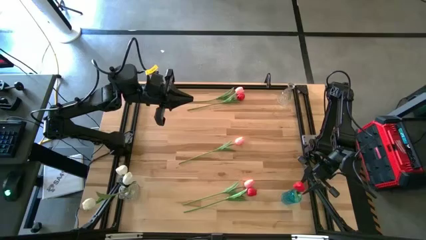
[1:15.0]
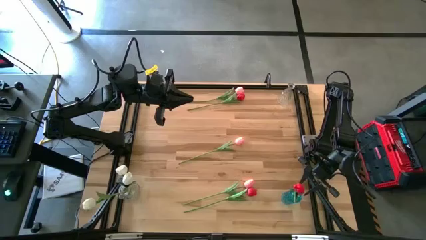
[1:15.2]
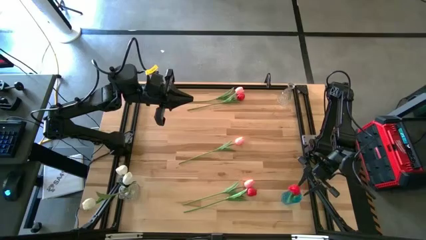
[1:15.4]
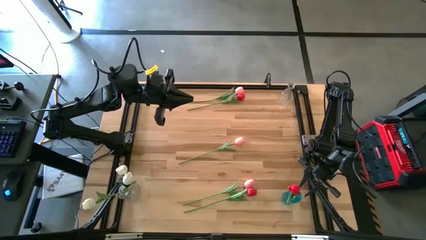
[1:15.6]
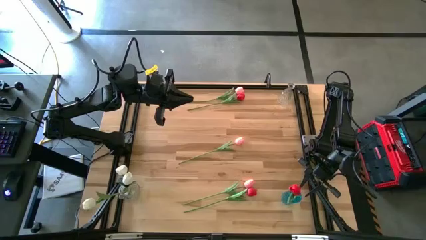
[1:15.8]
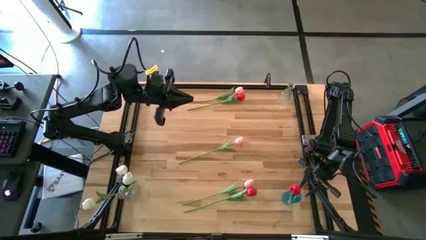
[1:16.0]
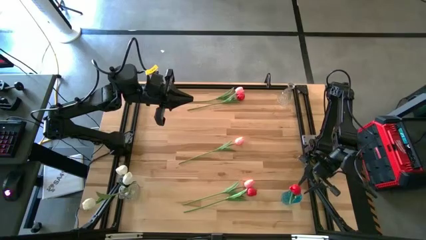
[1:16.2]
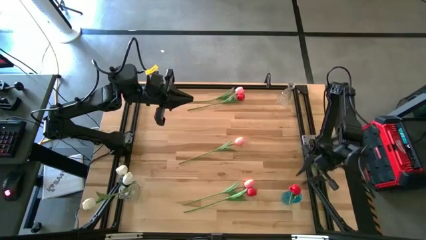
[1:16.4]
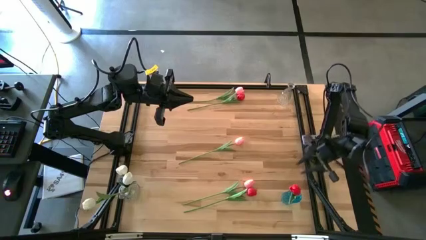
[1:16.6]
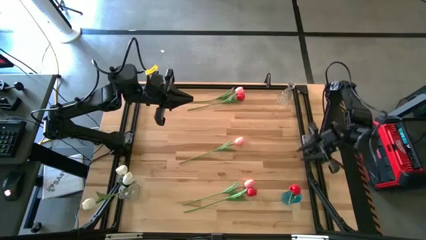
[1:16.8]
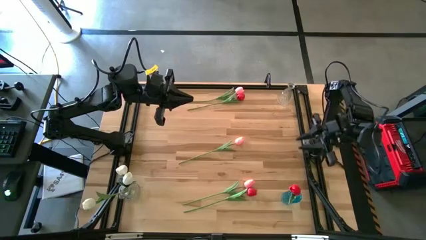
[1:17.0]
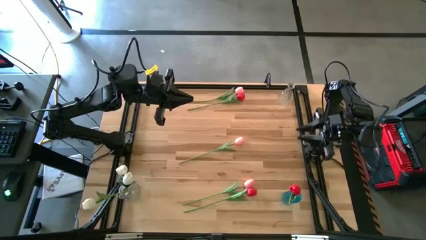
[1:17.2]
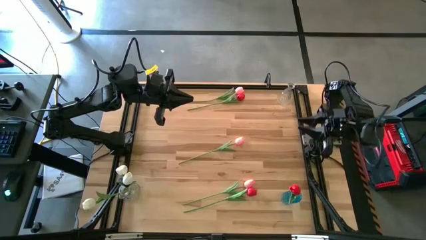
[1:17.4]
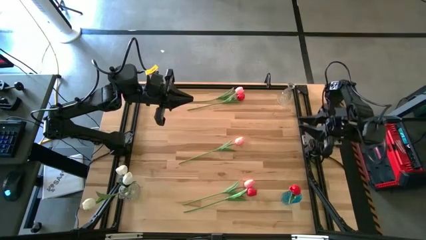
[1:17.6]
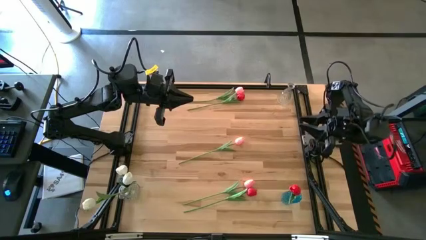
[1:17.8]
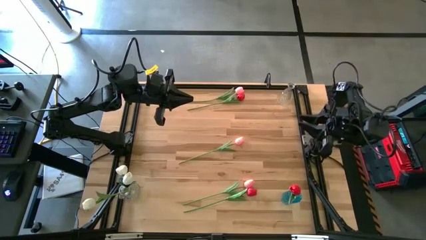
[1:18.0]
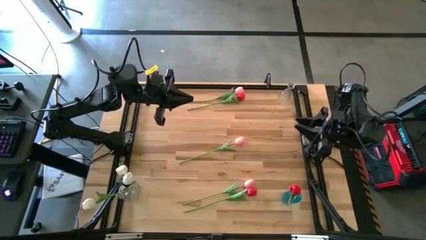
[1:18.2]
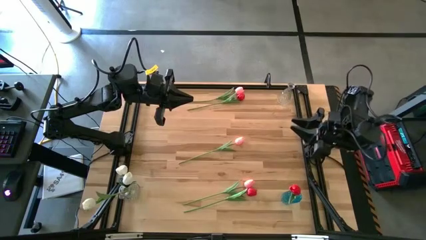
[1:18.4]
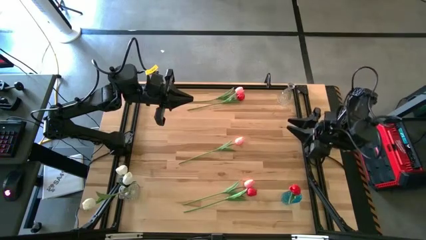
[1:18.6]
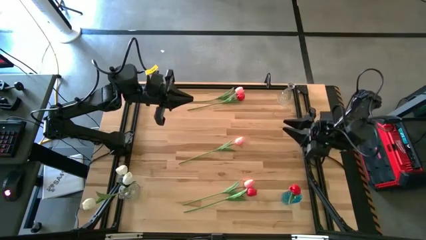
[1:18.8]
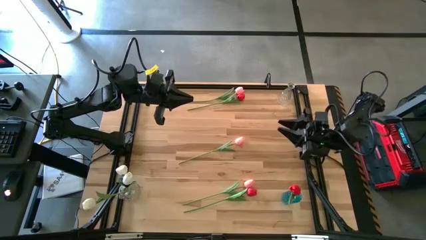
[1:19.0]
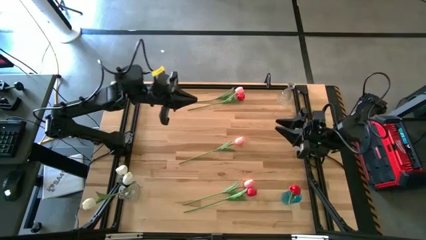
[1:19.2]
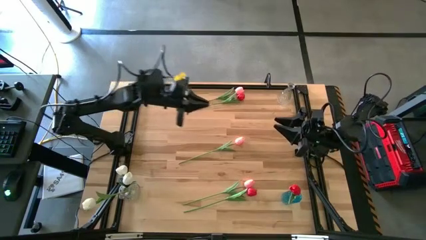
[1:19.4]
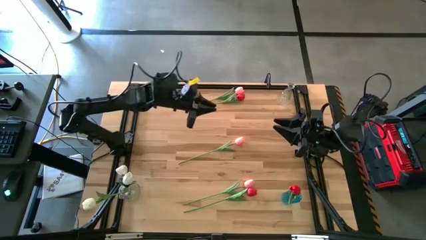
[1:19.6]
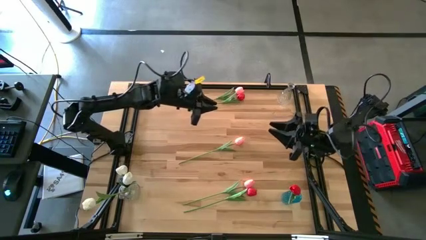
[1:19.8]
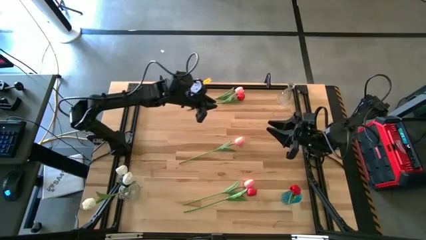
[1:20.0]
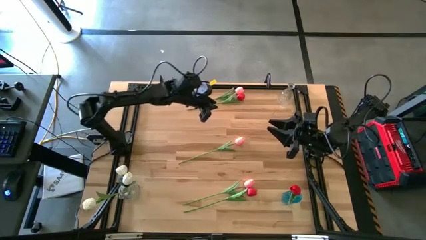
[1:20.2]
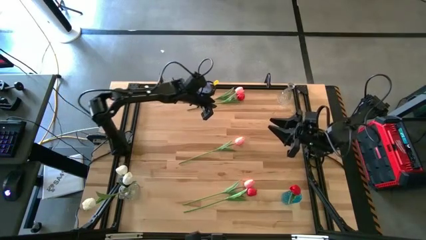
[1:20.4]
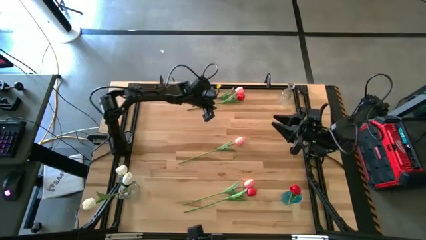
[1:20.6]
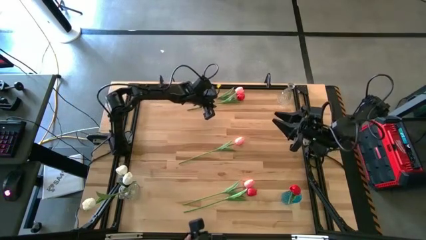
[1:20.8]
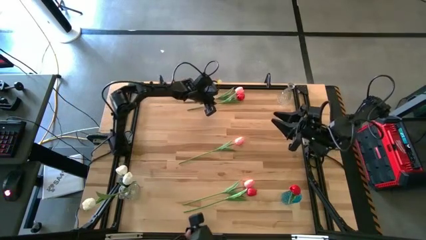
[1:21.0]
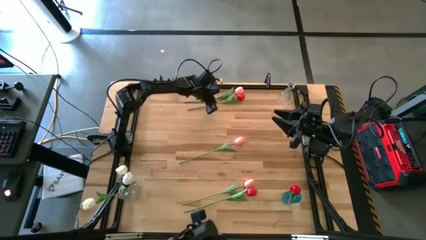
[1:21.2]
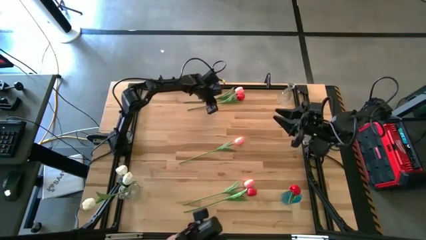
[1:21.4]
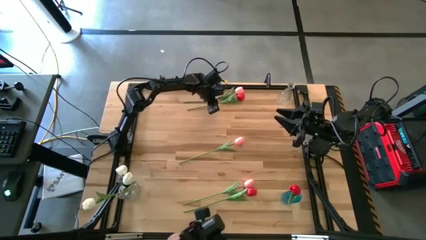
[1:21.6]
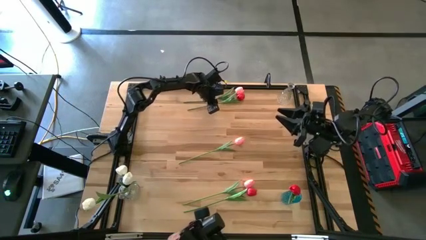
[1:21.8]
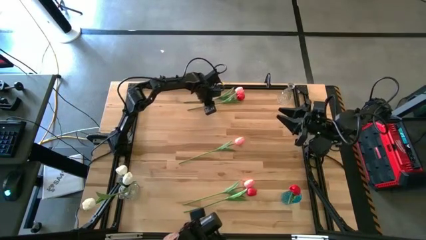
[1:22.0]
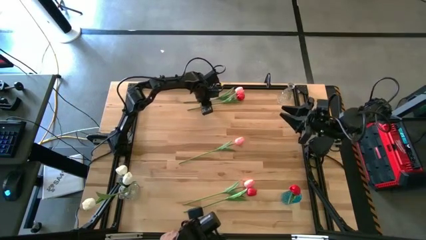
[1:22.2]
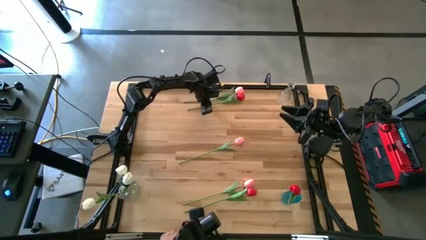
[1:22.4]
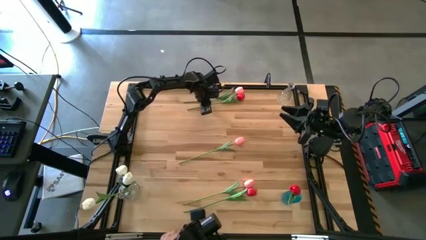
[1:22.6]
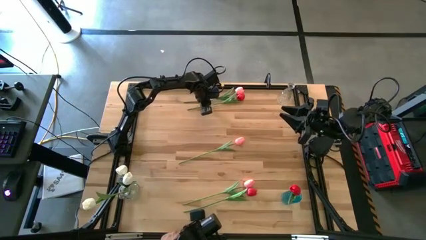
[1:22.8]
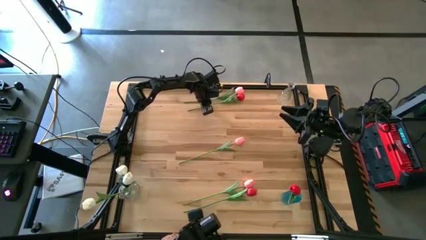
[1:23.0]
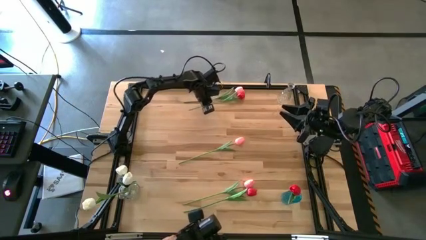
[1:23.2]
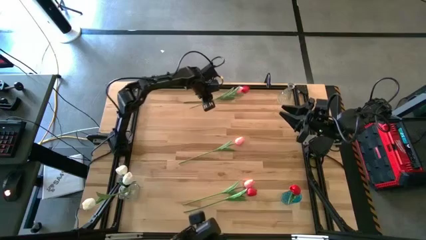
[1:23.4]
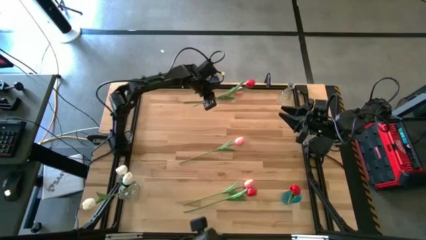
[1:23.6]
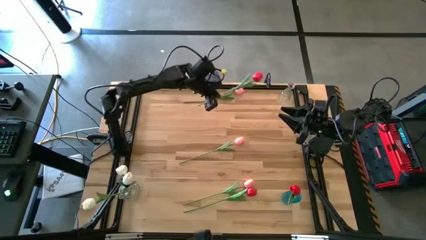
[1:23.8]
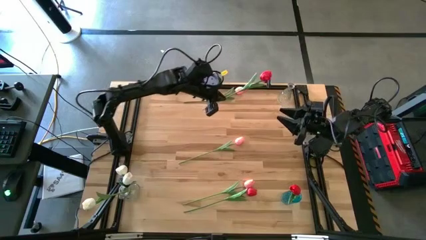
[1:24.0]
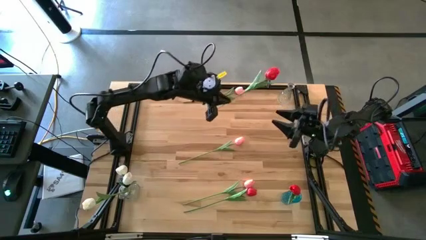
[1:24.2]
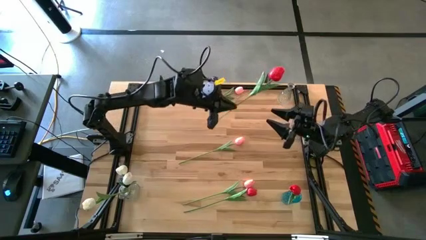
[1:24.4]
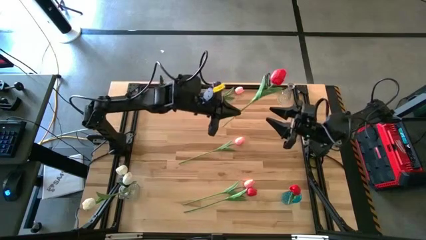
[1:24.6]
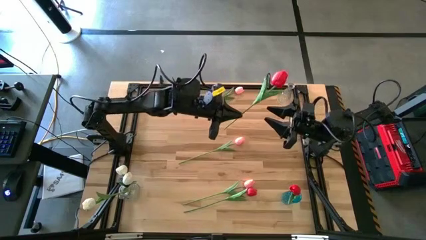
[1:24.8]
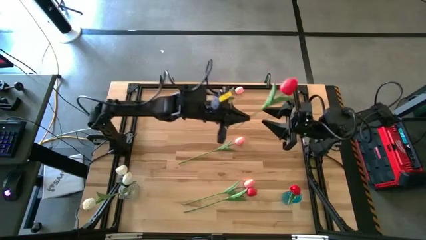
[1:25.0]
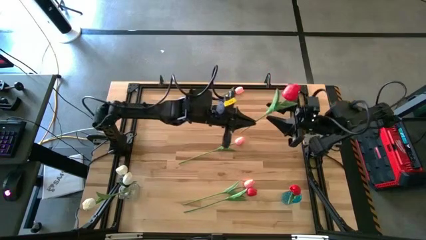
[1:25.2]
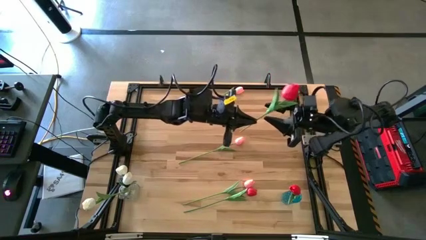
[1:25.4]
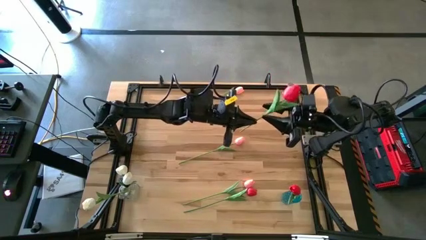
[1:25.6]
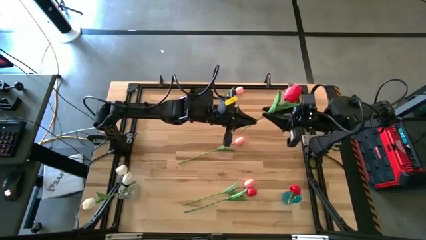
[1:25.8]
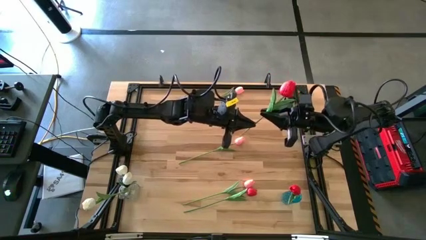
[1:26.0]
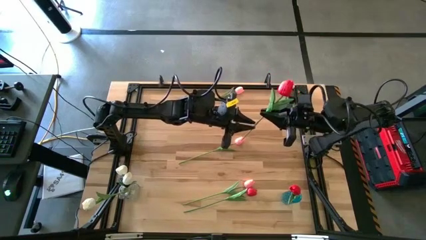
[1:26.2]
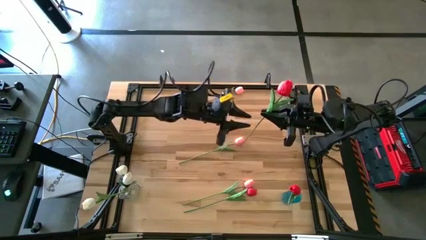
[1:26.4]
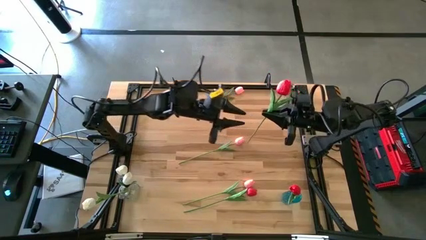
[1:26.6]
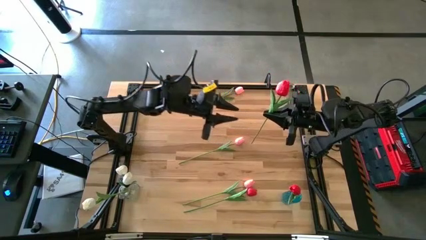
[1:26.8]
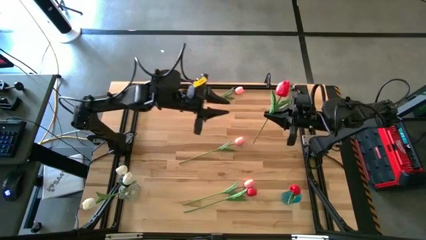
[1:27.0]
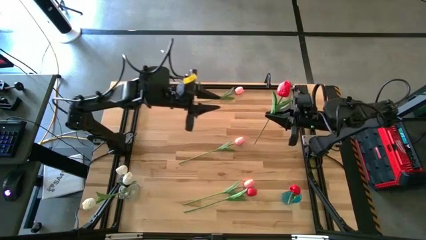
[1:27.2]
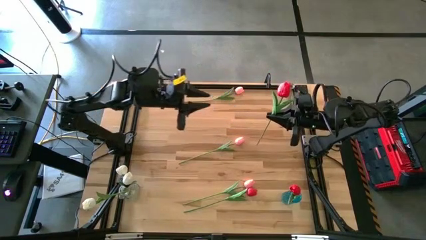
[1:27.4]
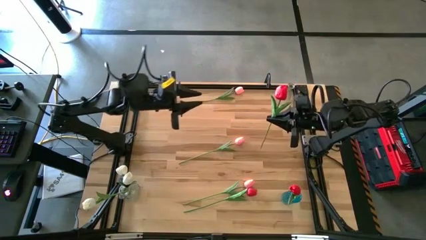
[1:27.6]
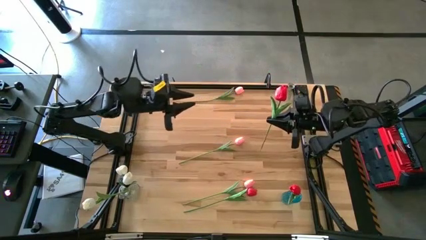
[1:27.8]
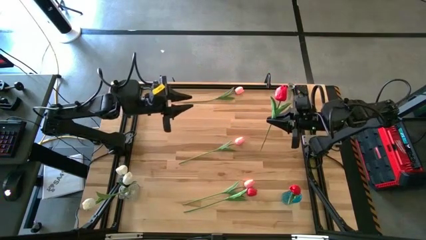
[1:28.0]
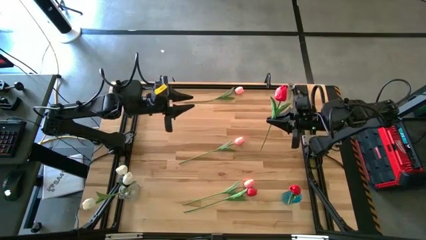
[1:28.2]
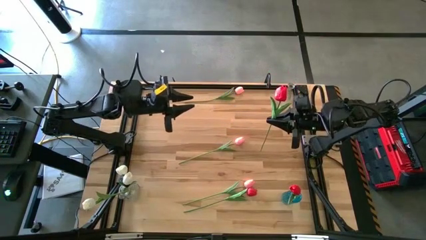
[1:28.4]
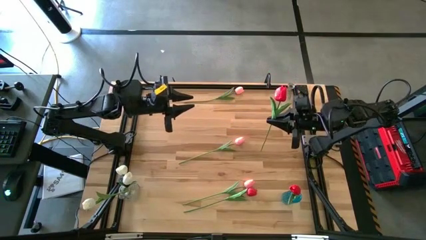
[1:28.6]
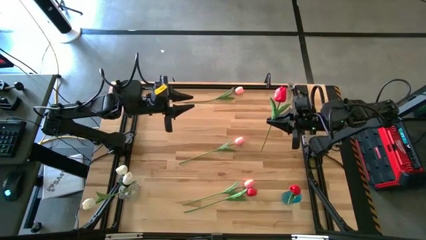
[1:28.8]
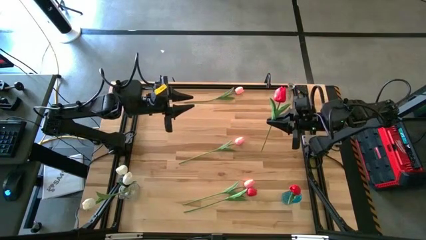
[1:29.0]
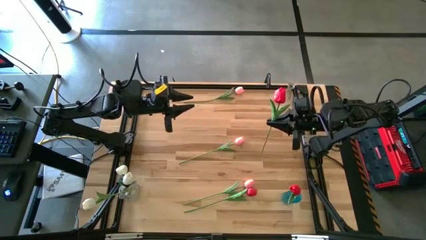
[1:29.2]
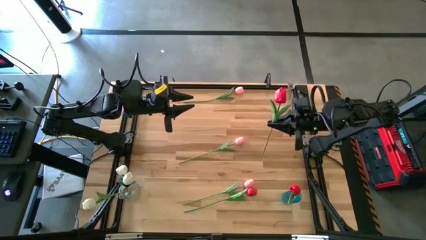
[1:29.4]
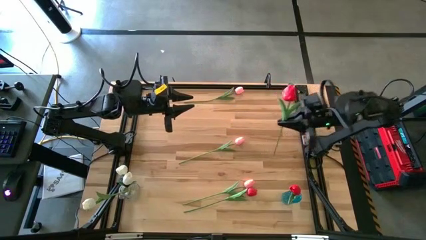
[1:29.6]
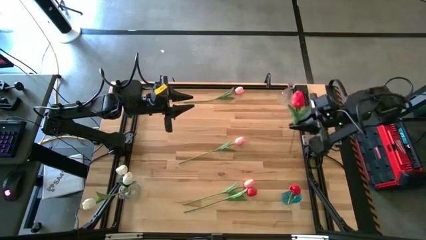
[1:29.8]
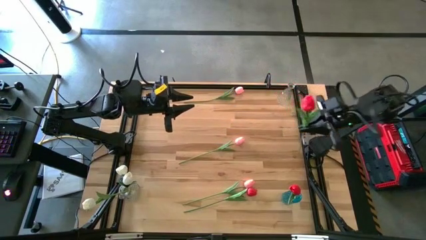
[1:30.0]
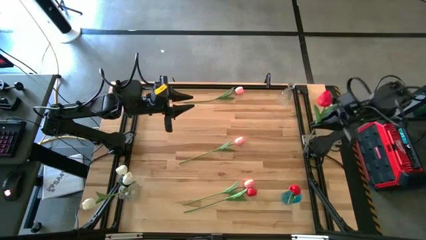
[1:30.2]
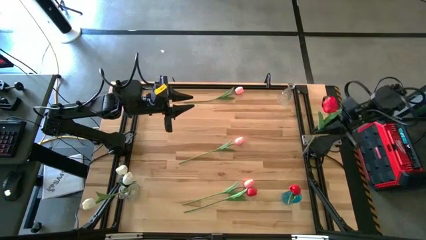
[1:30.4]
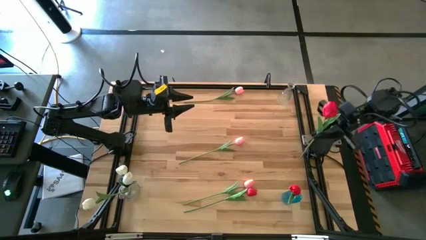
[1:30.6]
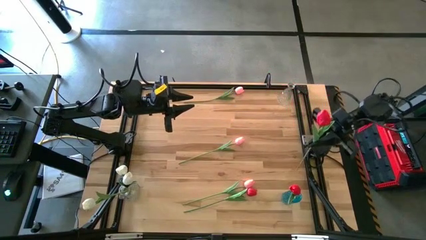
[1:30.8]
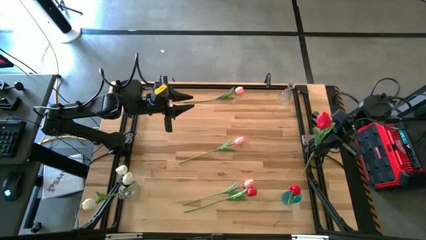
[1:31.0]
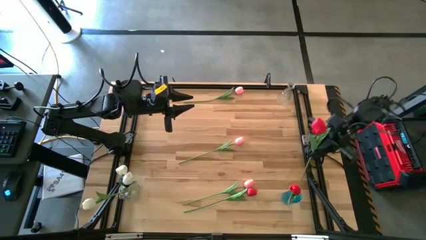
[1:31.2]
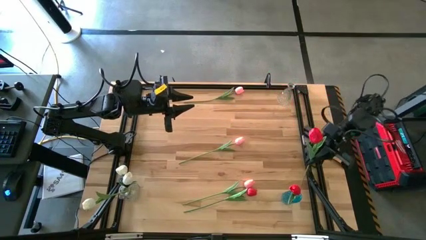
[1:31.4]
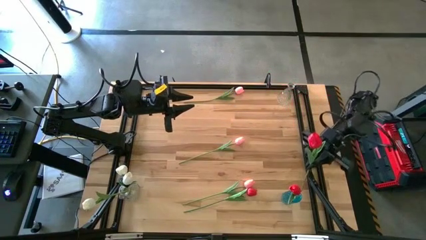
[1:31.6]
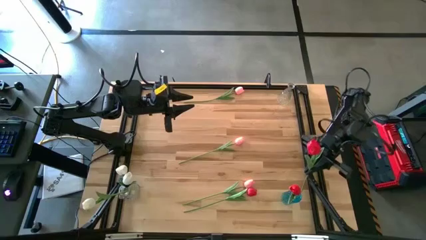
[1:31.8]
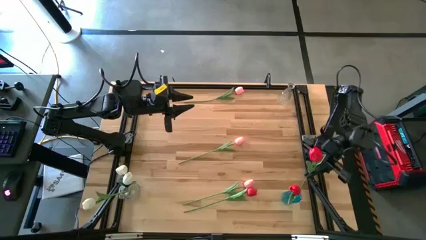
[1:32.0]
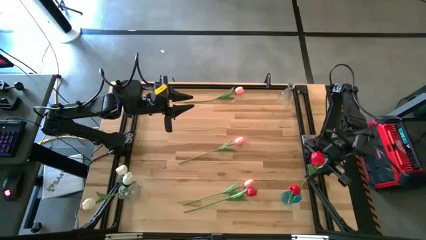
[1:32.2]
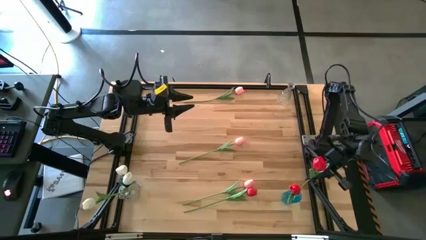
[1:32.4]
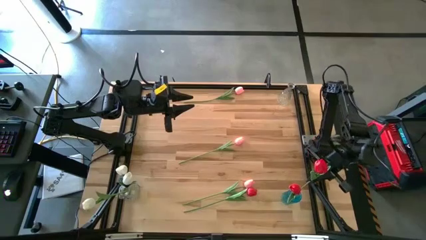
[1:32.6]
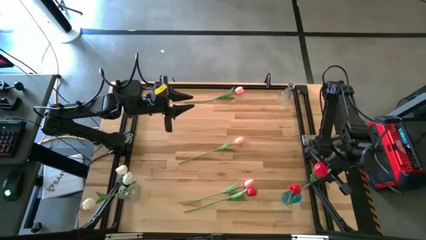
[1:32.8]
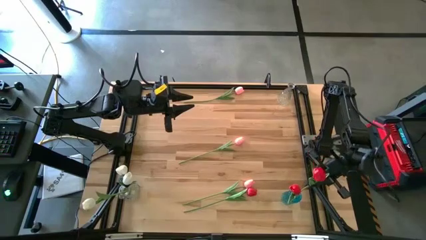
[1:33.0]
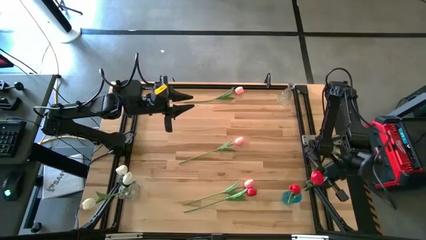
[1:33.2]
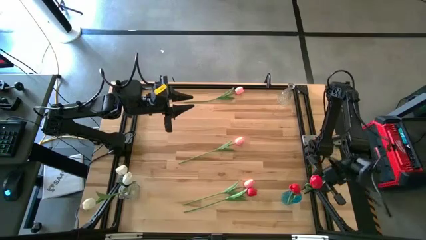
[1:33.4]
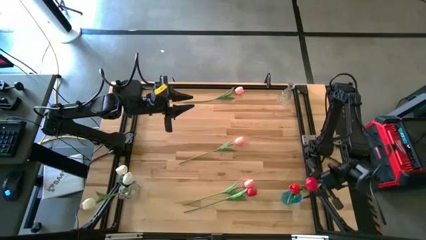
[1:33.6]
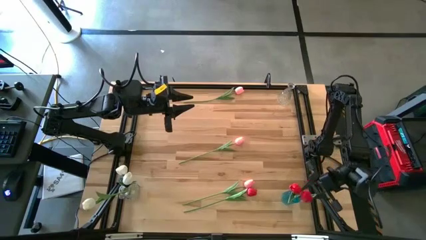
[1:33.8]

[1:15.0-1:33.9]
Task: Sort flowers into vase by color
Put the top red flower into the blue vase
